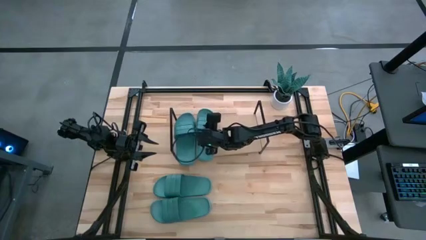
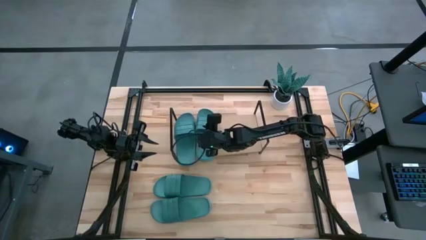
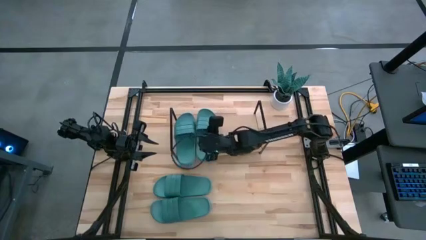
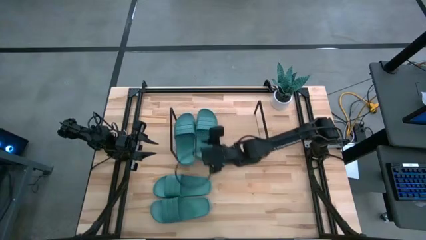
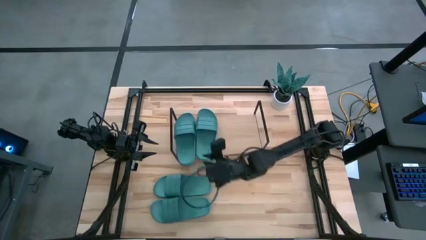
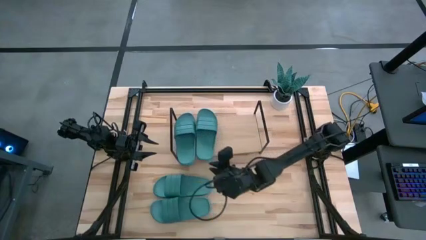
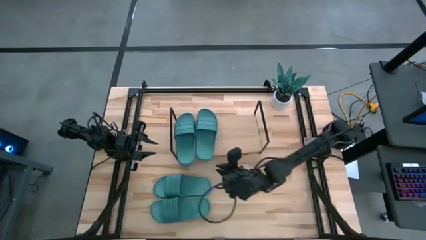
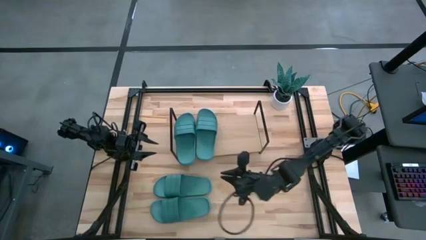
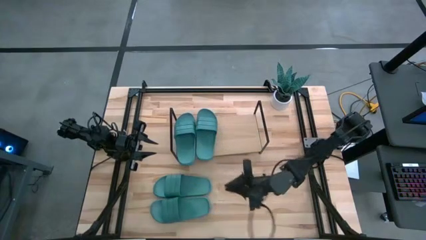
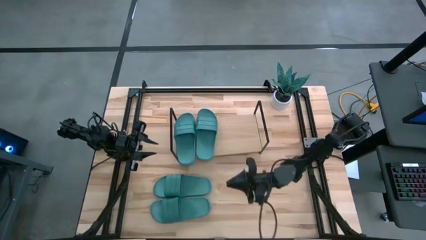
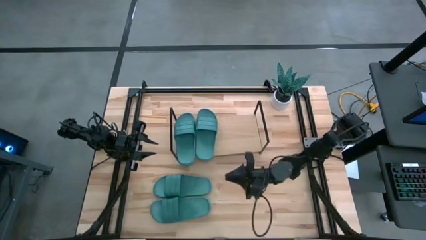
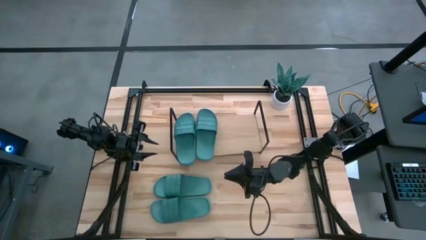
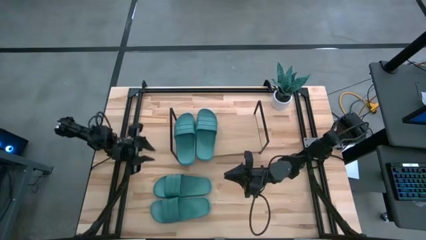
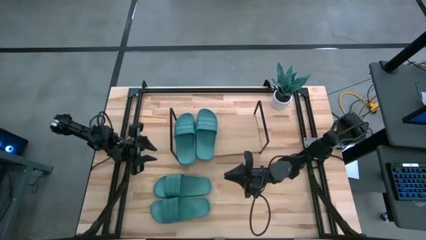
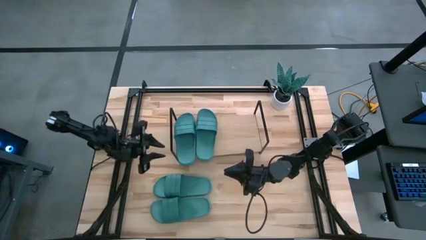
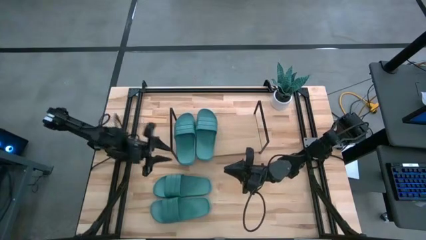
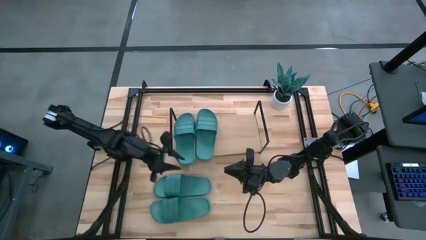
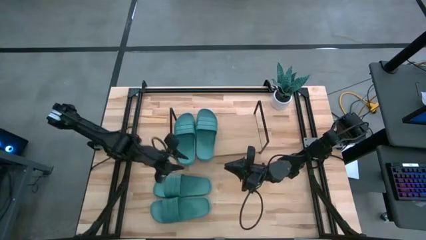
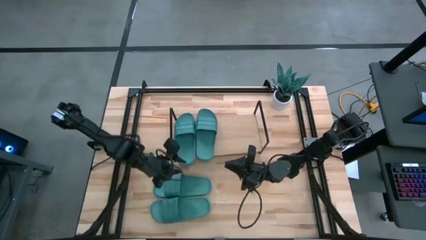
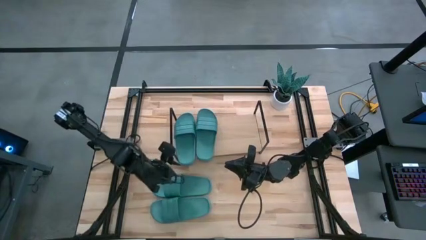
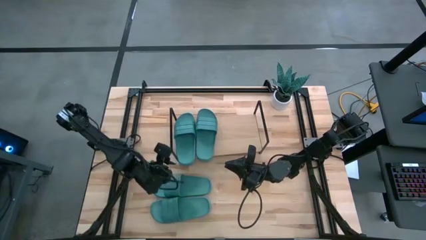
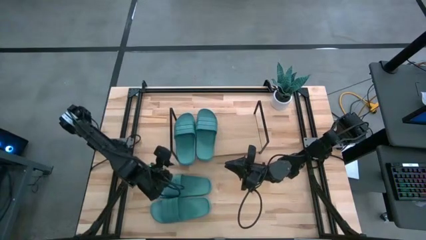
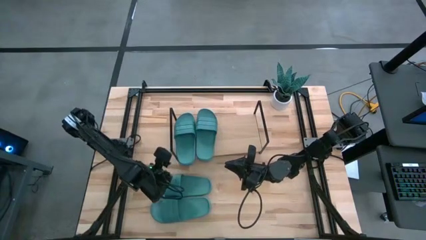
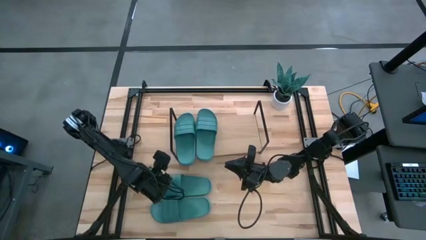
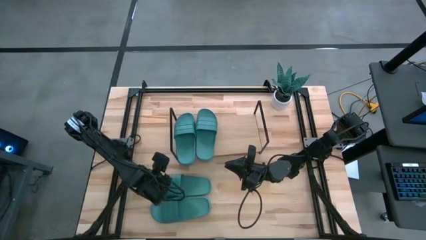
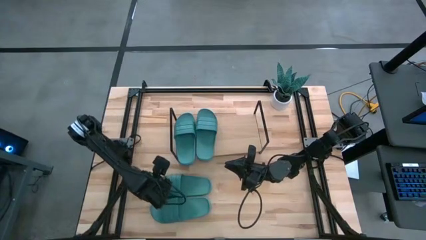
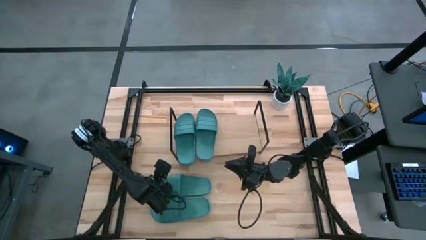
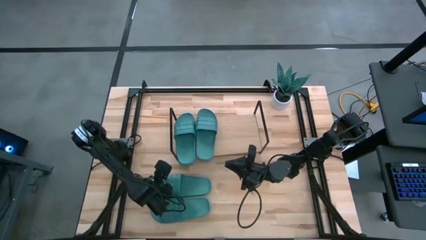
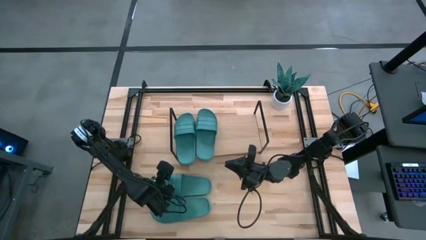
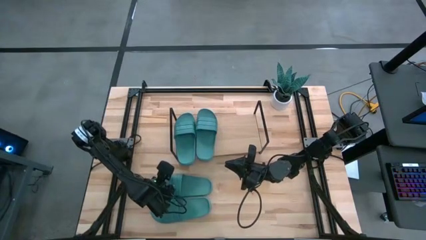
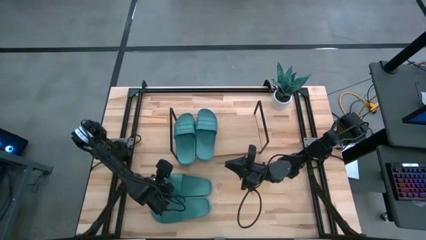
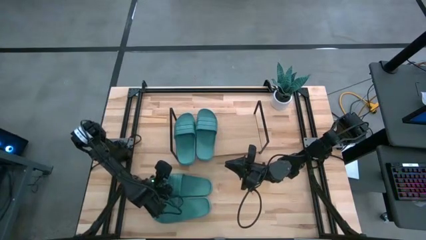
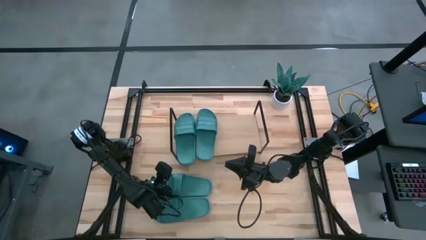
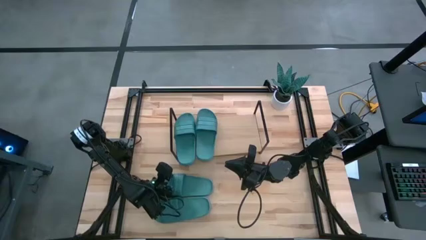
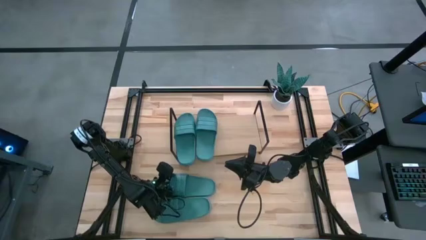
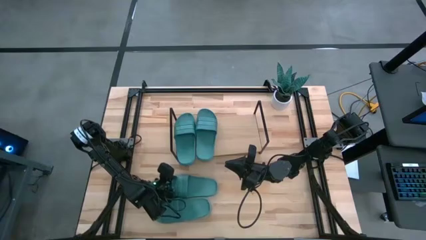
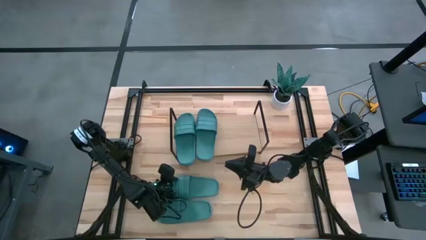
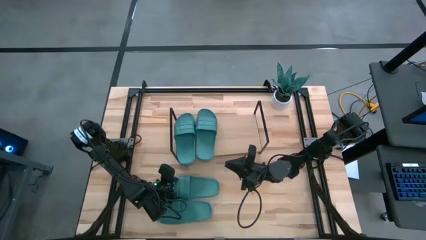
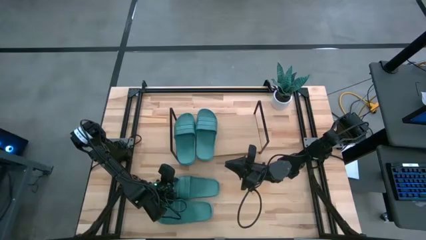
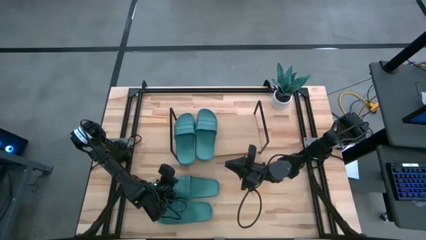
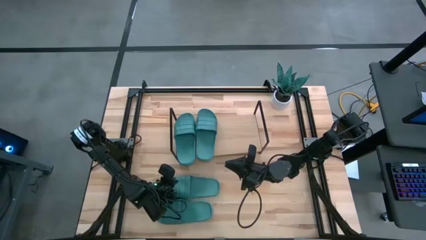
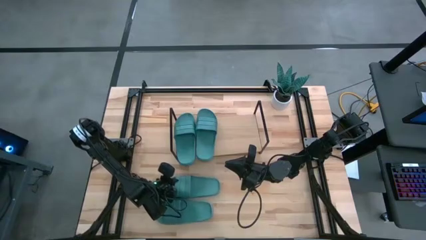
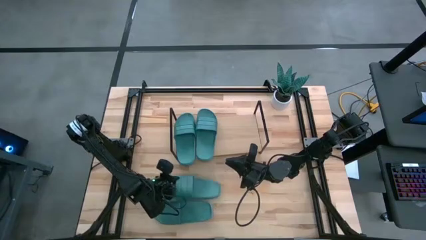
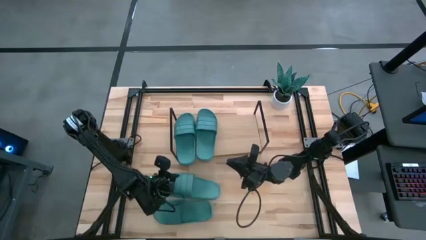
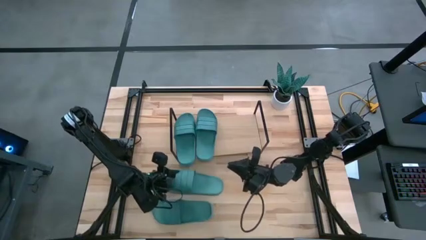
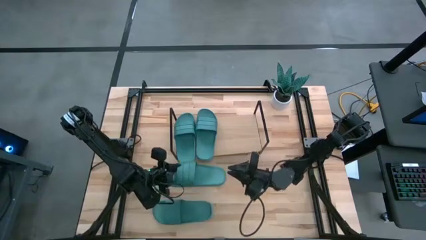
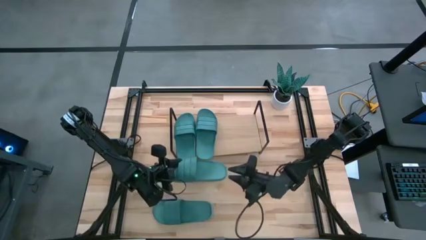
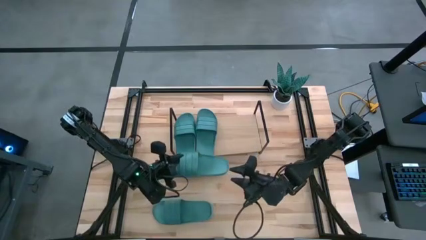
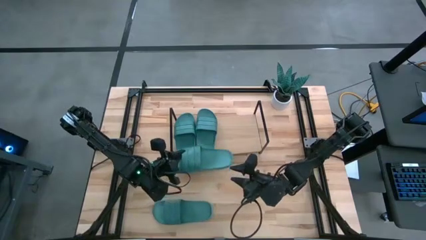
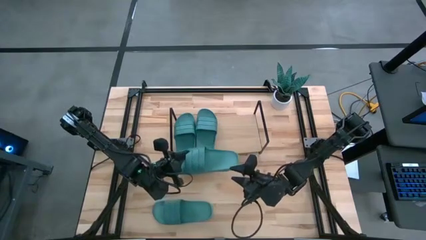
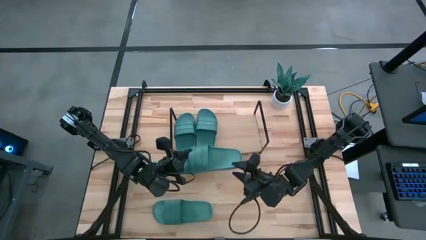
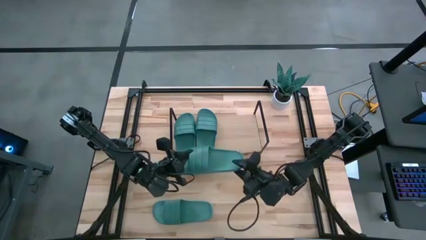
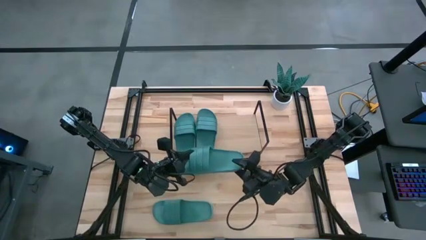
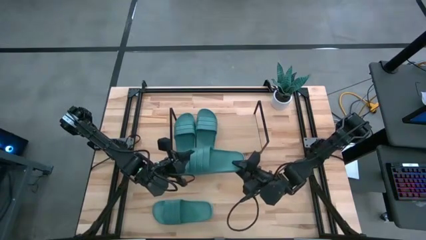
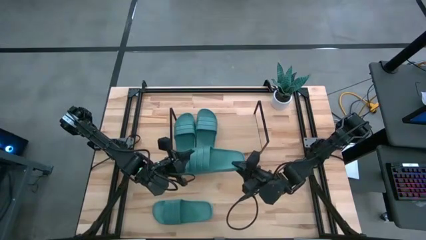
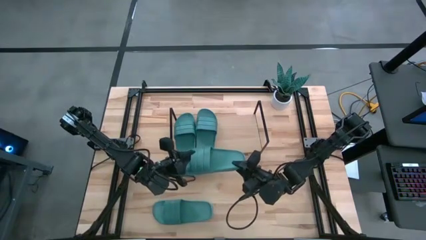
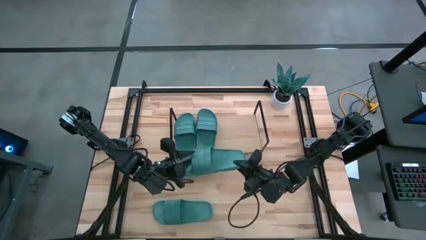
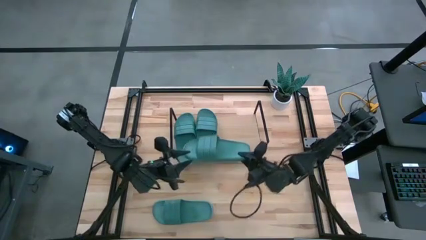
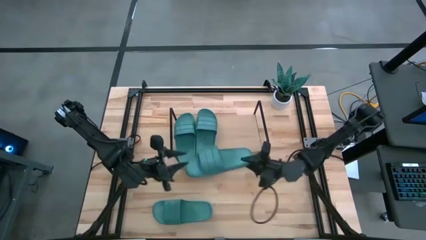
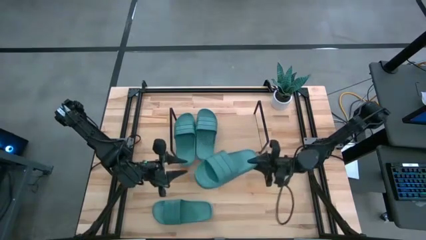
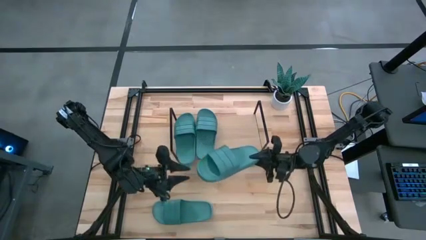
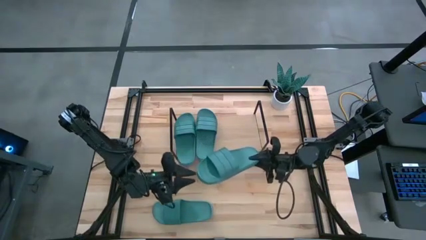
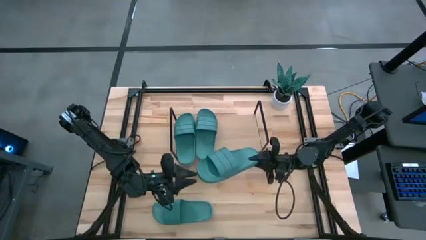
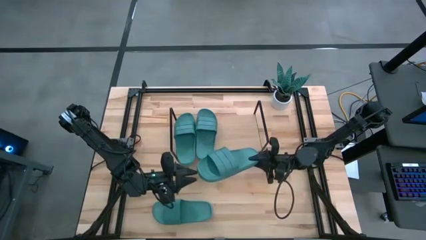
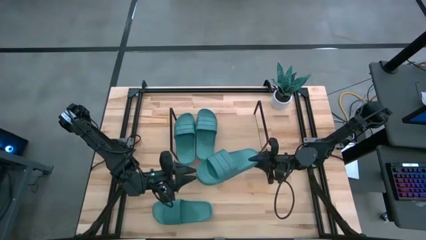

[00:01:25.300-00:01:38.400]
Task: Pick and place slides into the shelf
Put the green slipper on the shelf

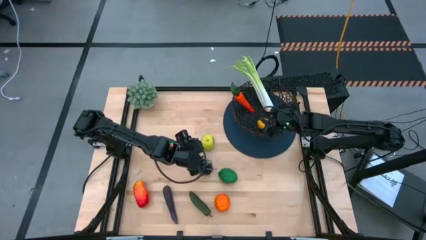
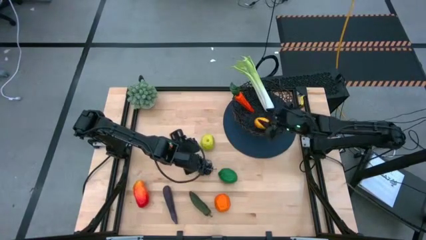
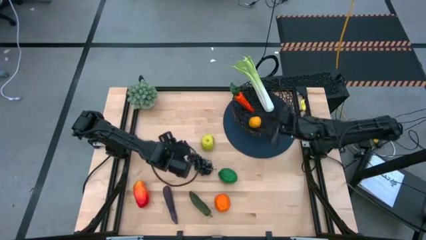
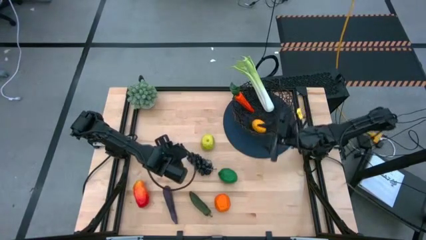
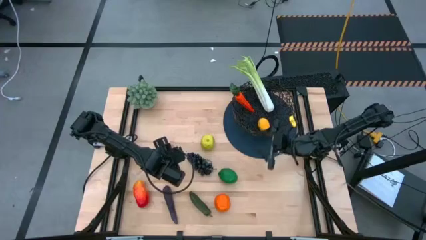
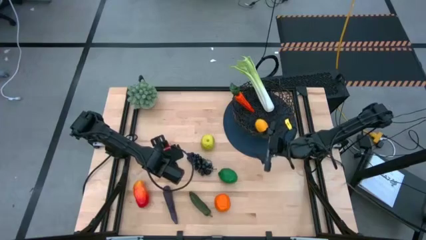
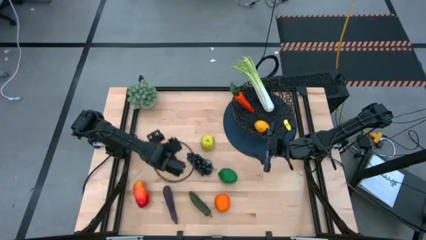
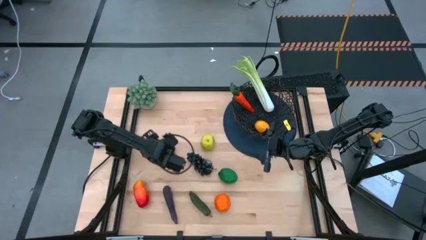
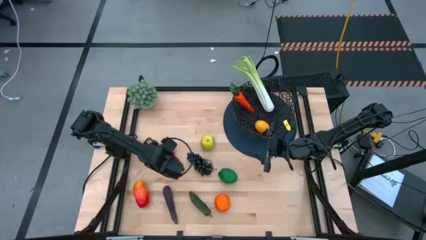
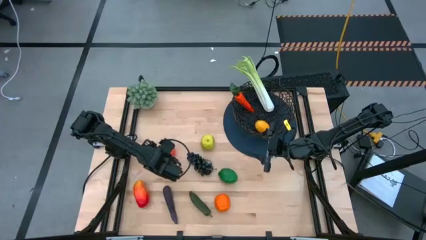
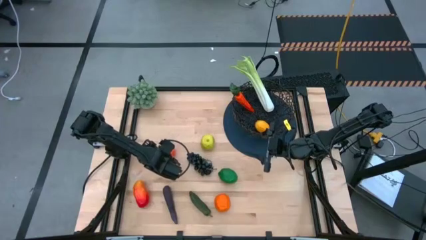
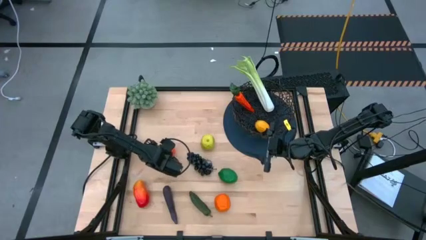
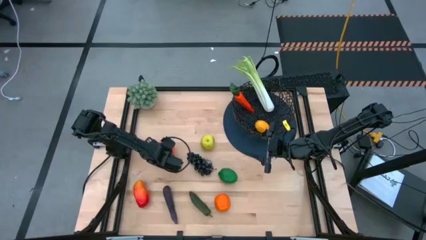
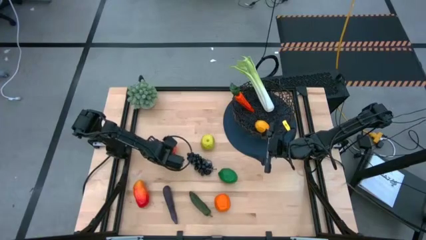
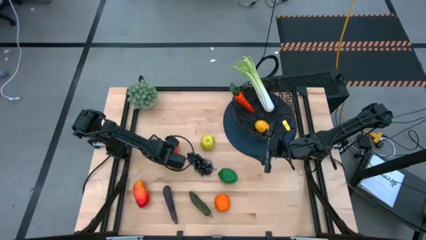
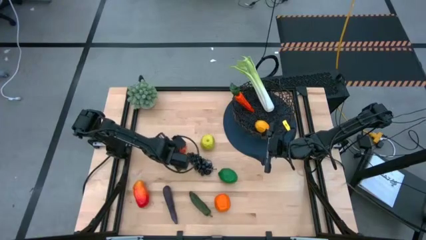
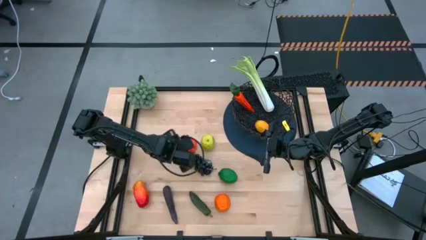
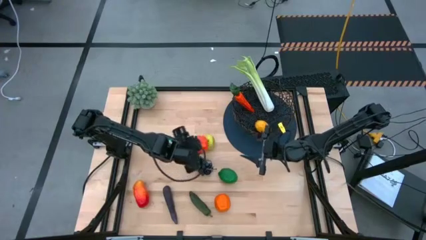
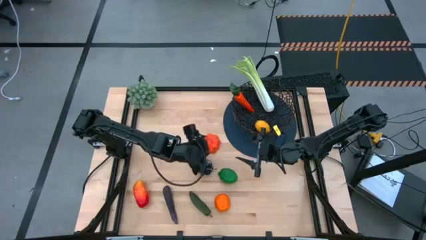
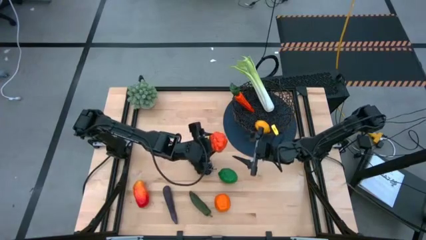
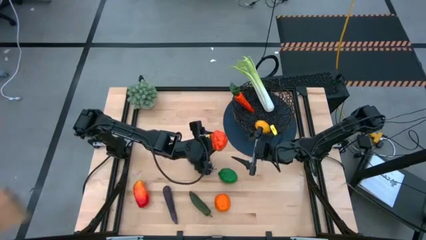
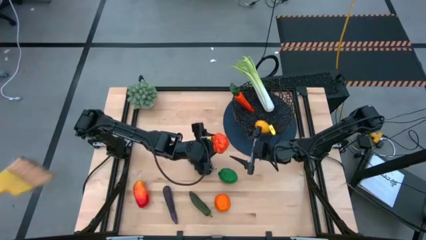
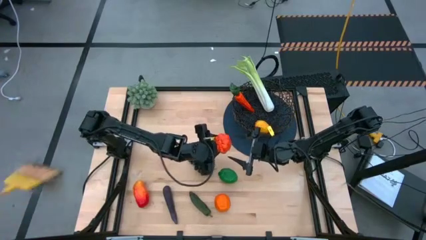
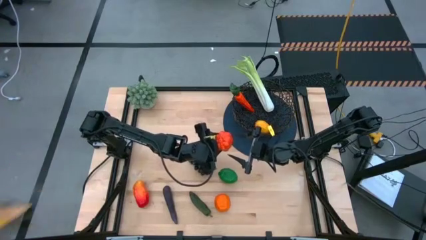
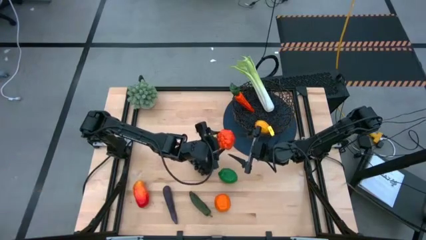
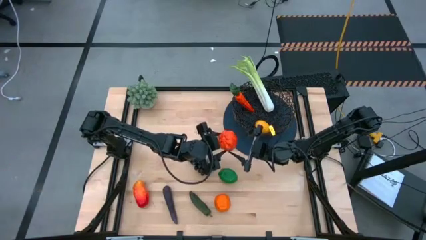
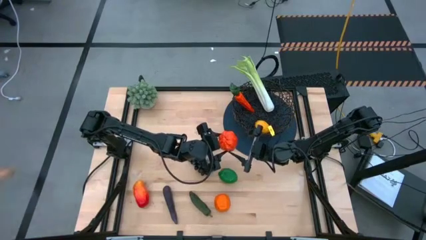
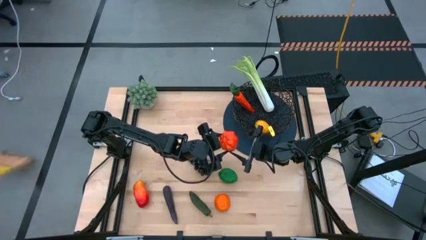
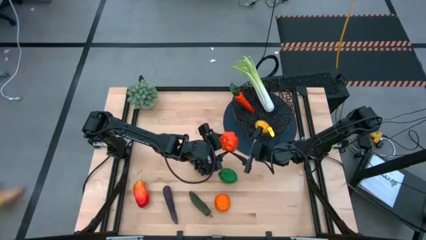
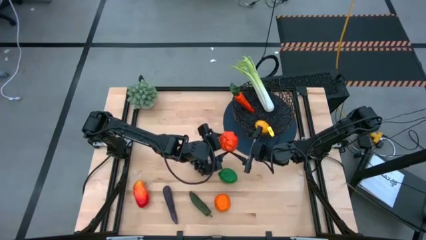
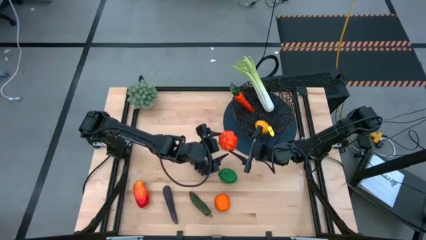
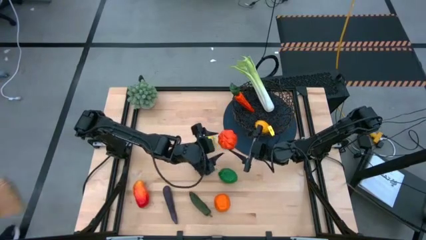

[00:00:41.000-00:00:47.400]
Task: Build produce basket
Put the orange pumpkin into the black wire basket
